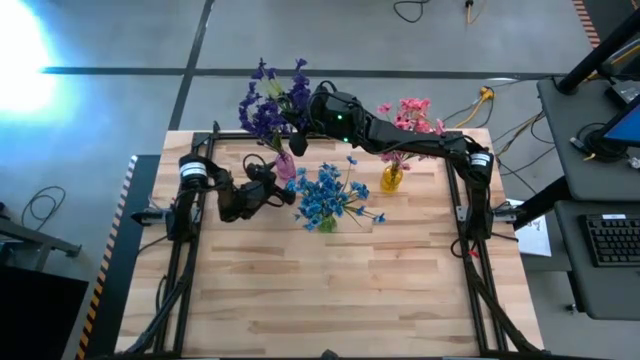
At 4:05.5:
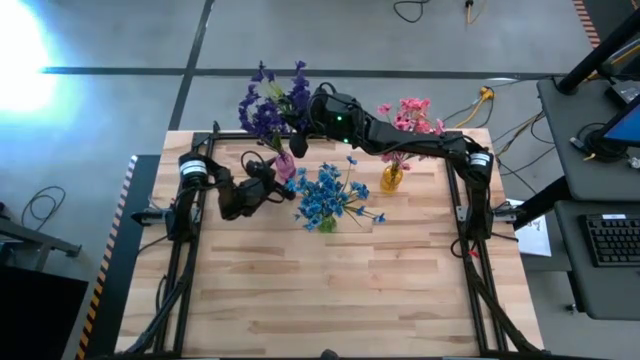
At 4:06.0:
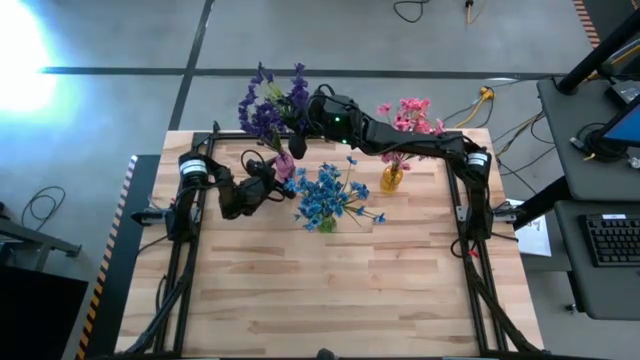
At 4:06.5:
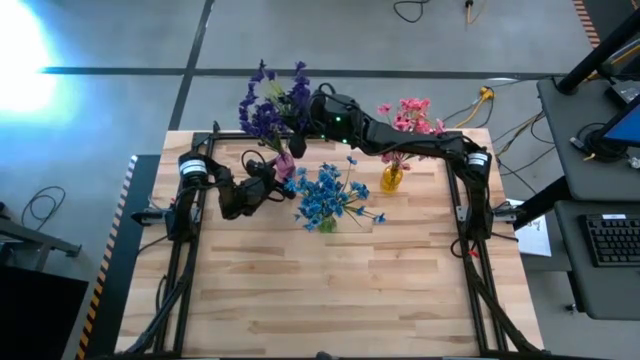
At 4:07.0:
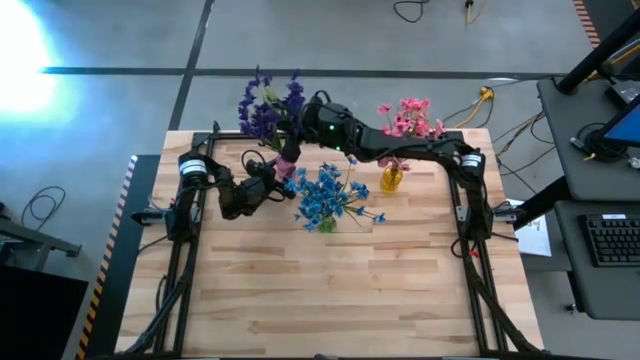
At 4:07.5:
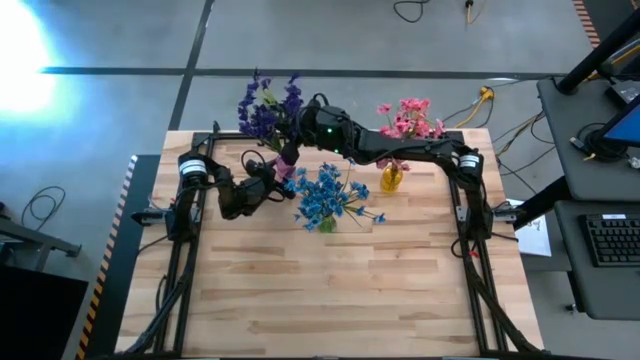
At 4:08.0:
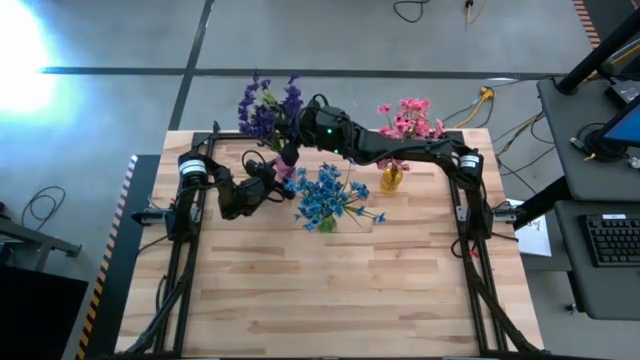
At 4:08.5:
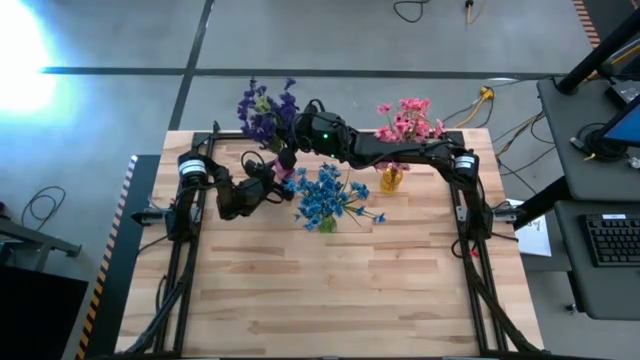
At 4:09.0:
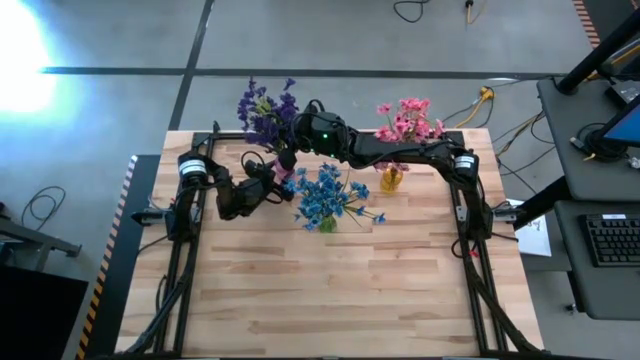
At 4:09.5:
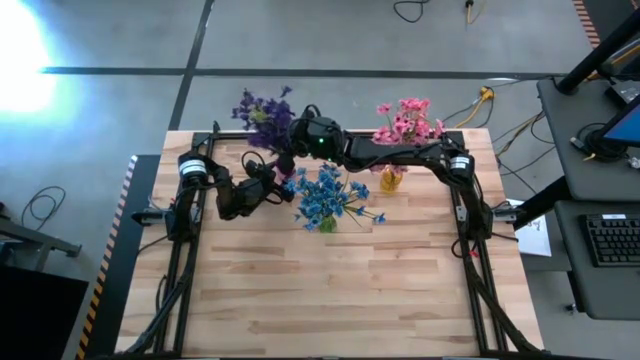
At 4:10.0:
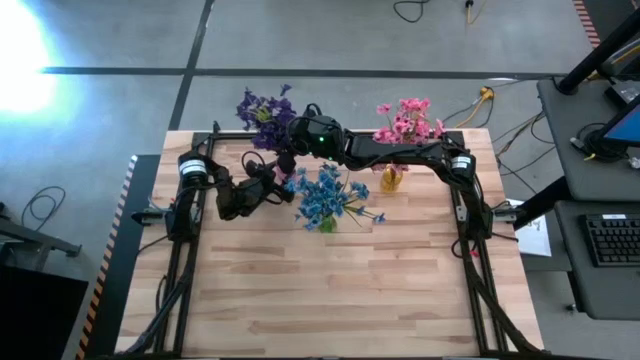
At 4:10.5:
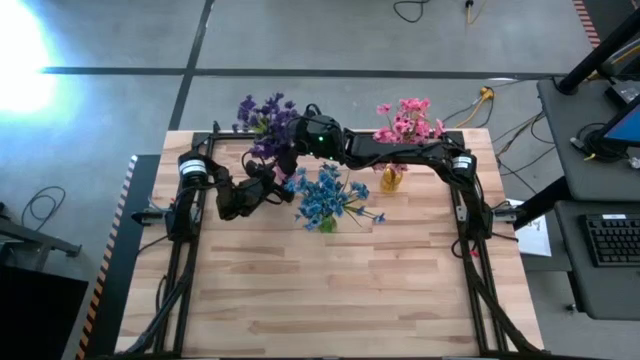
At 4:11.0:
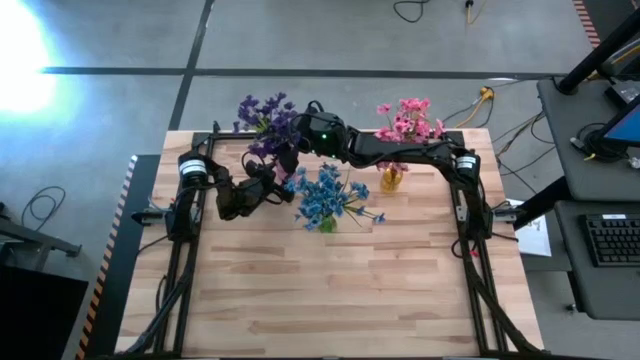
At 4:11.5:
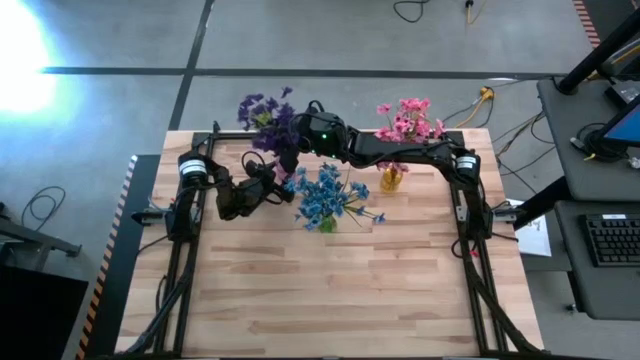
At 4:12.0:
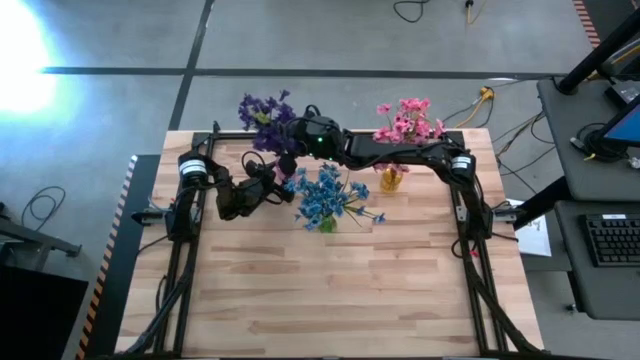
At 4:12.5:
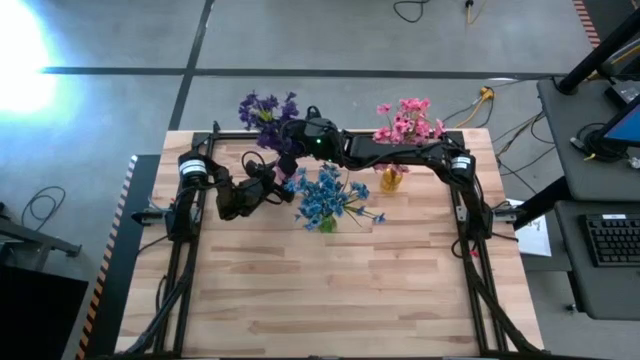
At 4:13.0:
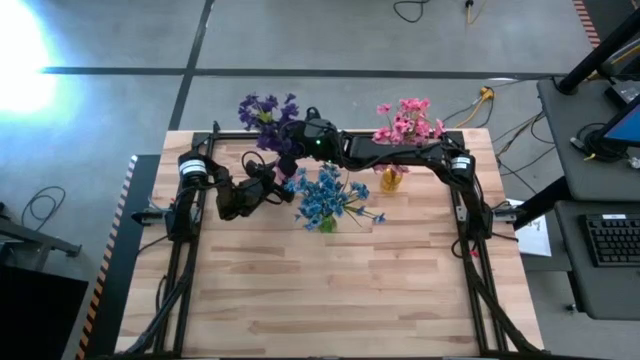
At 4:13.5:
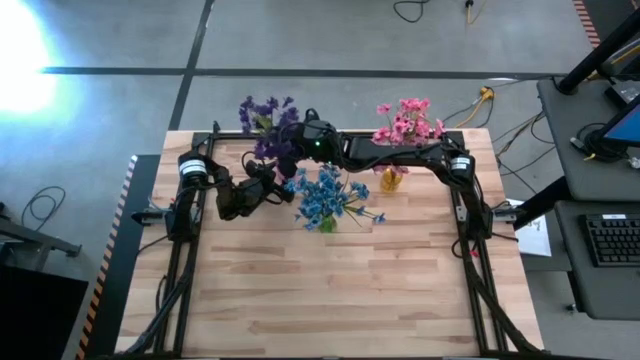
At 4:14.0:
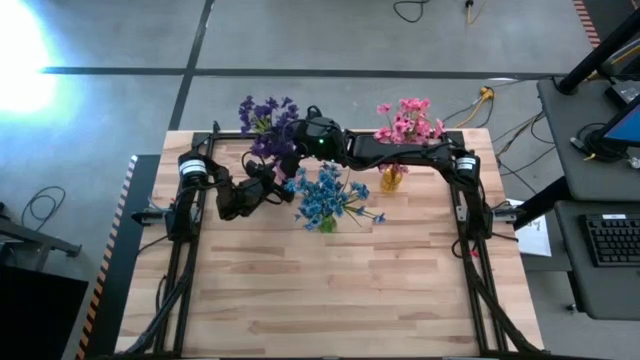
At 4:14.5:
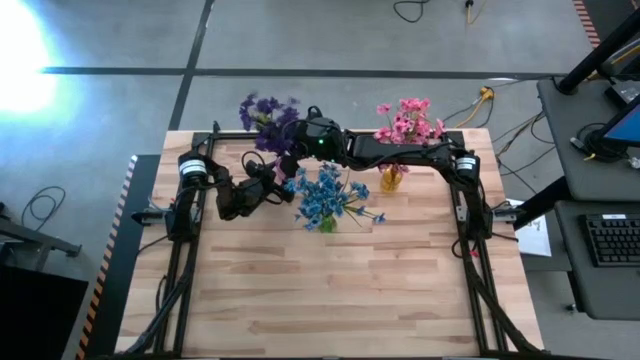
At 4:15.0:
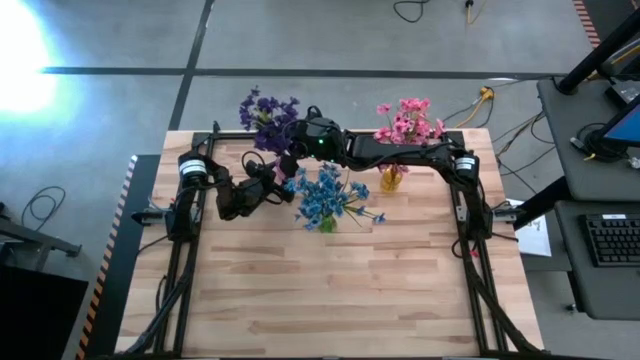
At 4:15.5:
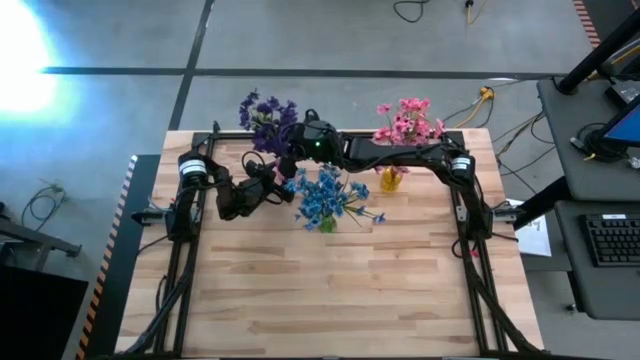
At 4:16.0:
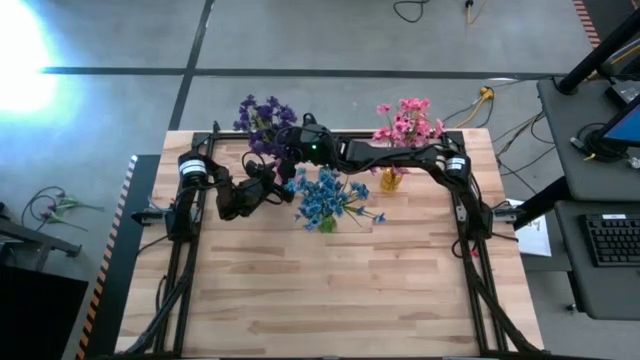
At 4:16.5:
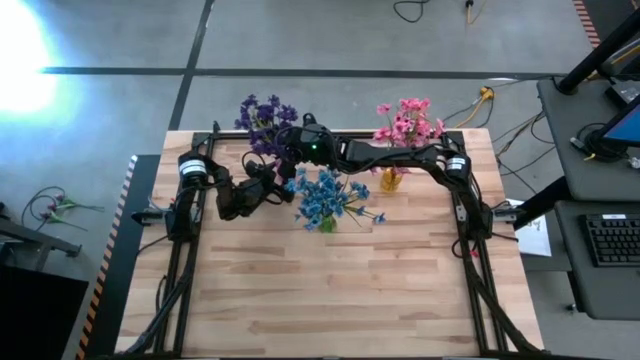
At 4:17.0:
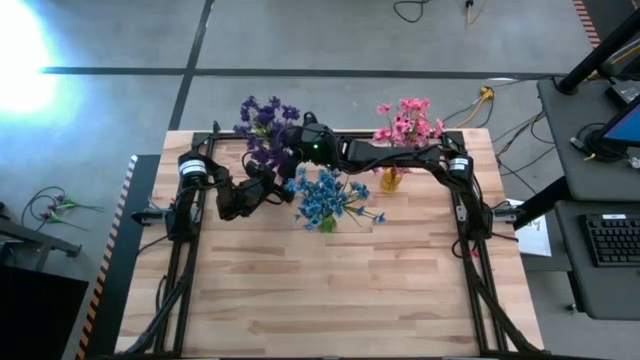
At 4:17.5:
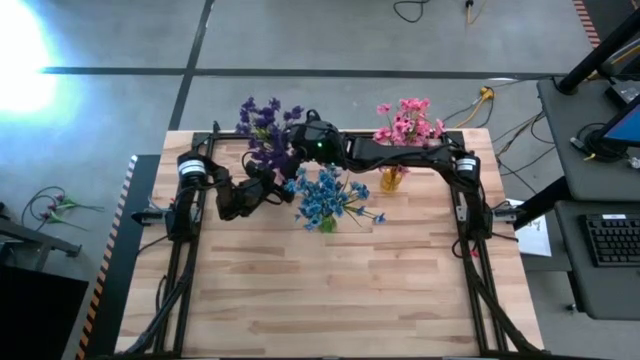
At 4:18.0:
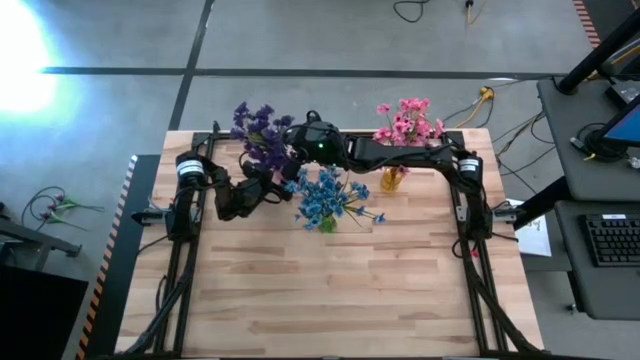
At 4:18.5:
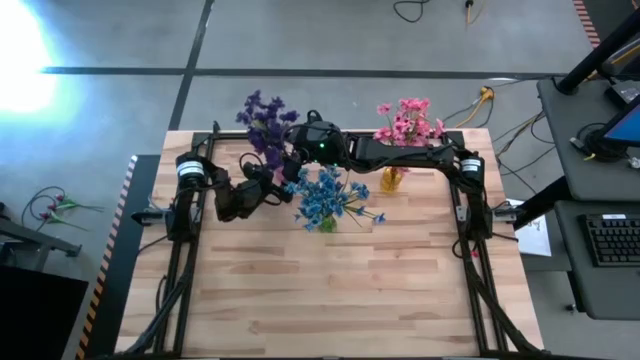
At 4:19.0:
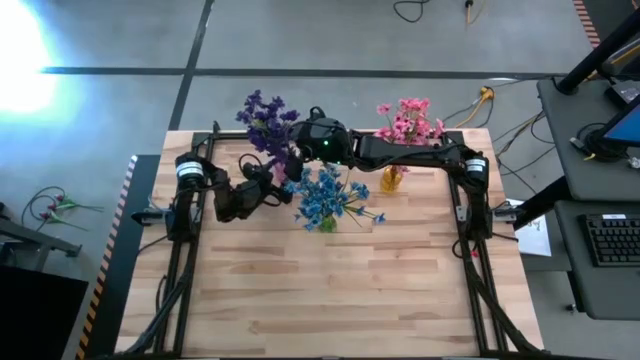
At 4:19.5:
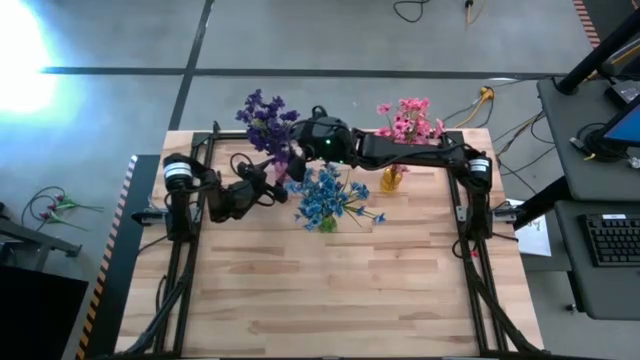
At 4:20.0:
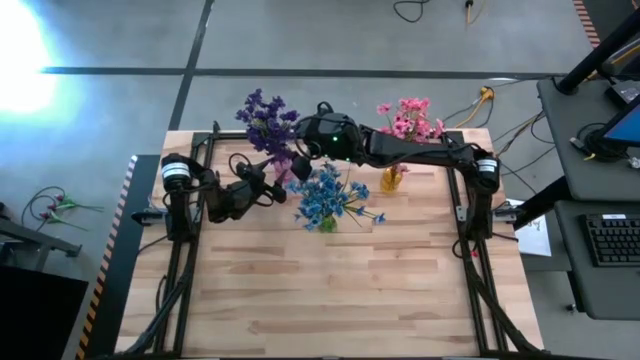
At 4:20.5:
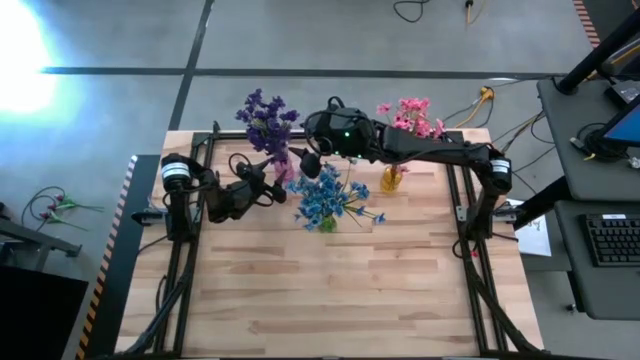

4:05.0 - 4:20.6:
Task: Sort flowers into vase by color
Put the violet flowers into the violet vase

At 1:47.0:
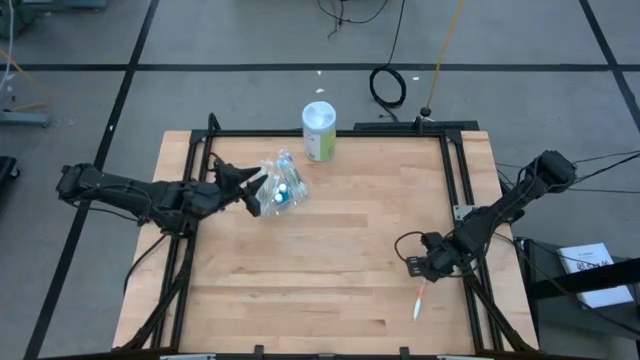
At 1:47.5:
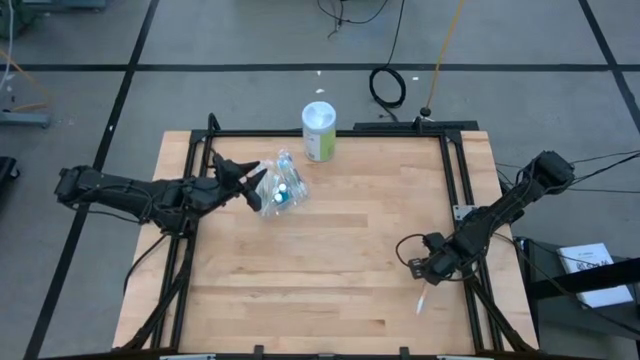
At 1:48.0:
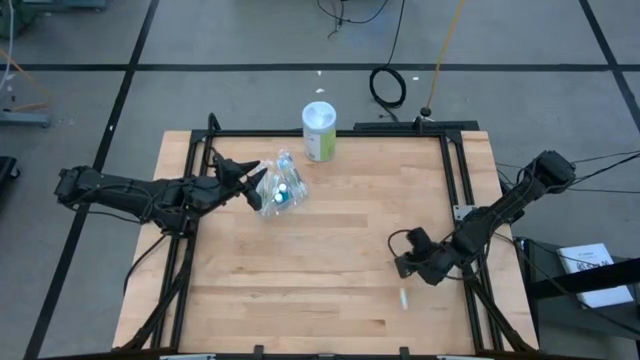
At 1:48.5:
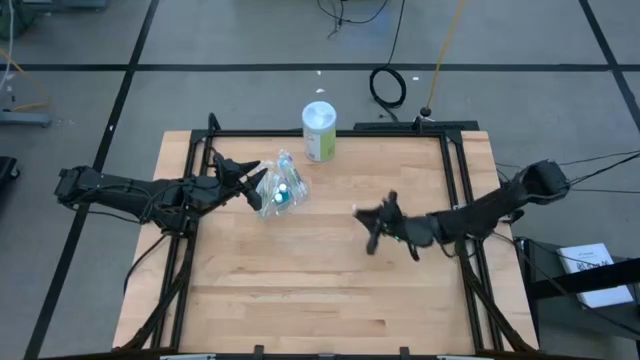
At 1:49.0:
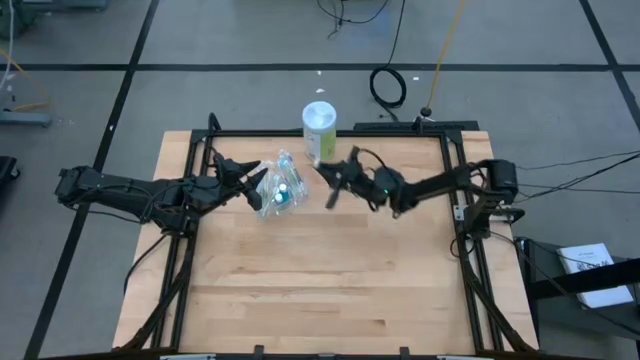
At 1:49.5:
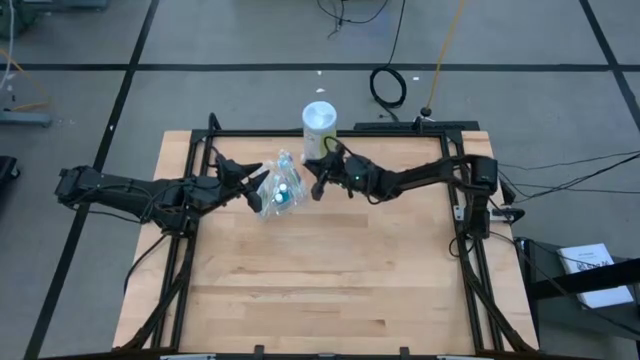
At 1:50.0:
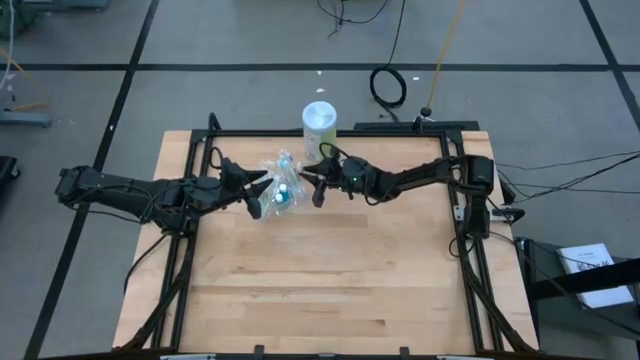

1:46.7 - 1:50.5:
Task: Pick & Place toothbrushing station
Put the orange toothbrush into the transparent organizer

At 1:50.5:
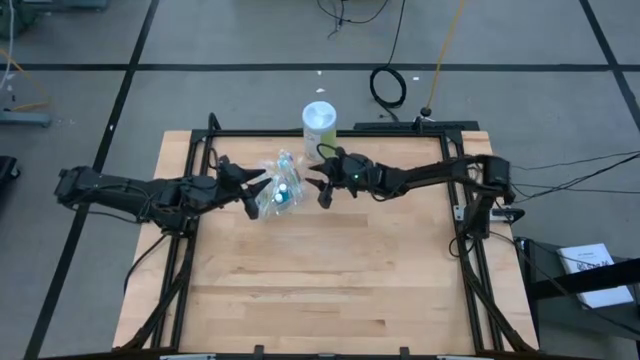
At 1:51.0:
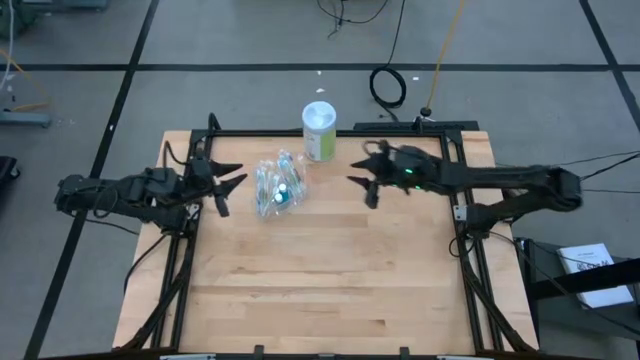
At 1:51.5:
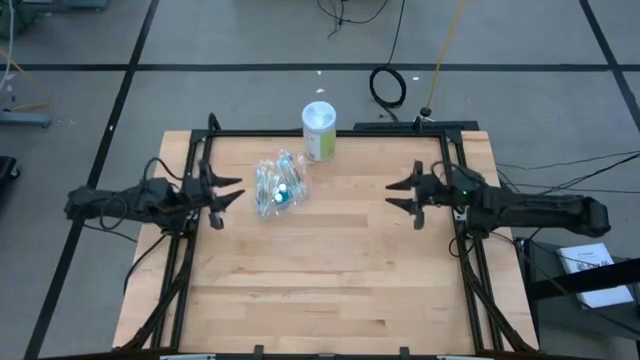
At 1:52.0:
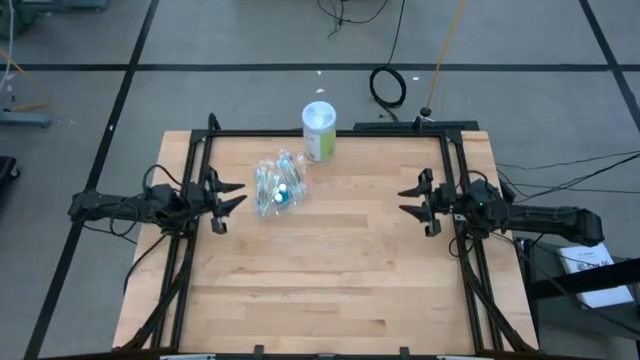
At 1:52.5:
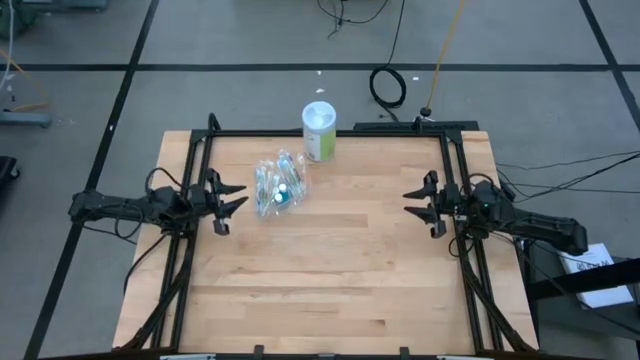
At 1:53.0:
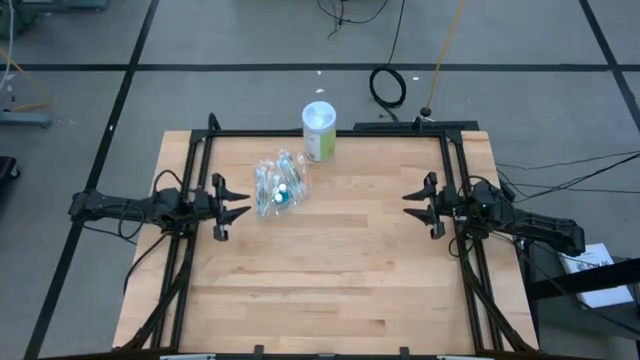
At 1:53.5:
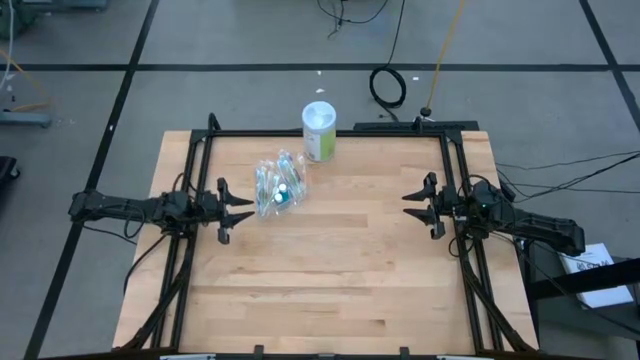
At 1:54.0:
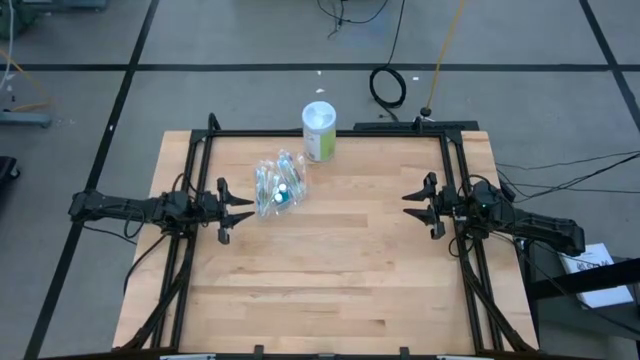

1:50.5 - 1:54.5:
Return to Home Position
